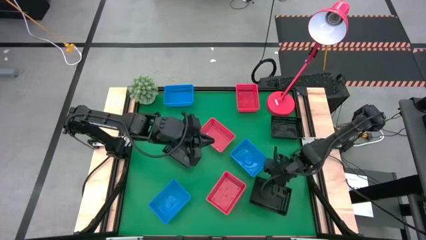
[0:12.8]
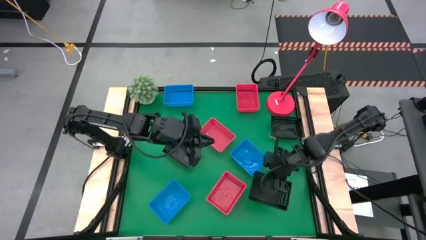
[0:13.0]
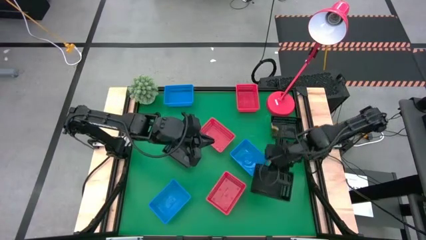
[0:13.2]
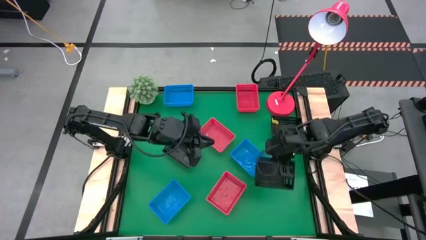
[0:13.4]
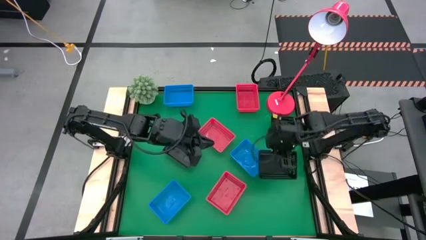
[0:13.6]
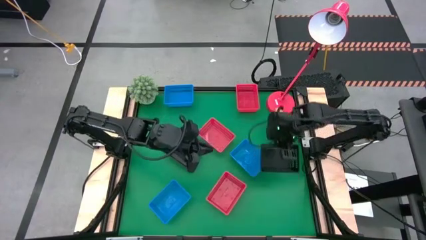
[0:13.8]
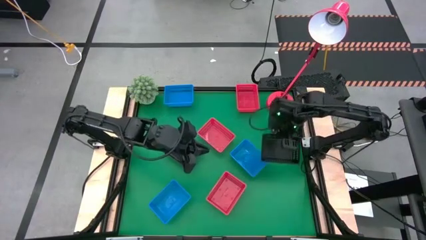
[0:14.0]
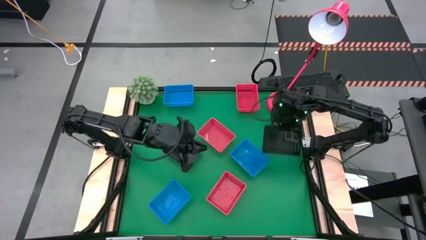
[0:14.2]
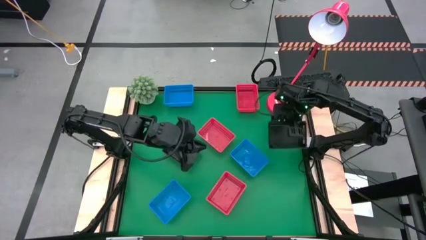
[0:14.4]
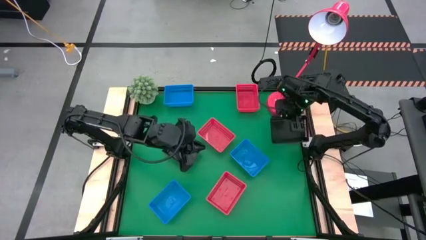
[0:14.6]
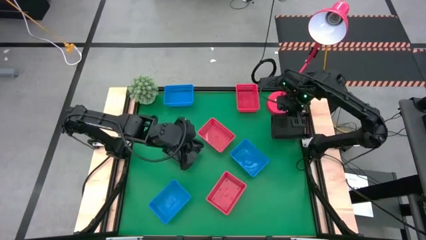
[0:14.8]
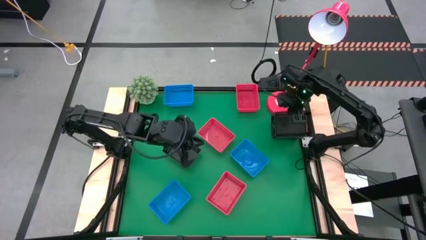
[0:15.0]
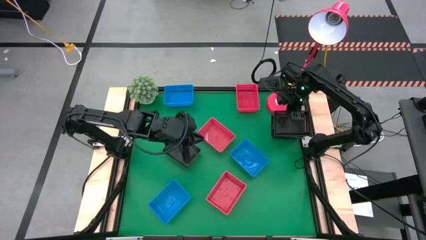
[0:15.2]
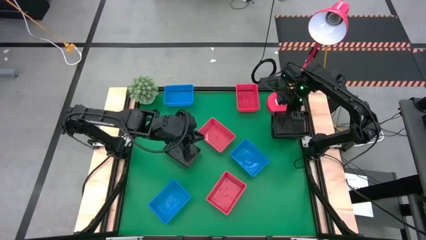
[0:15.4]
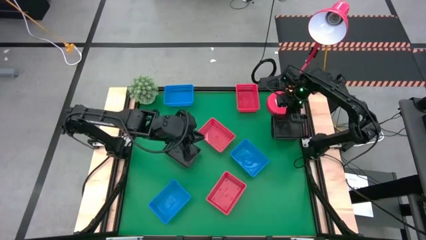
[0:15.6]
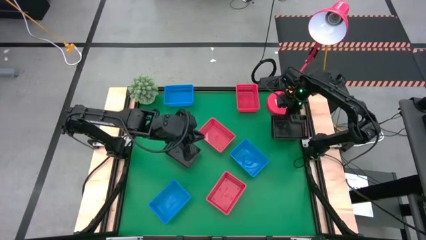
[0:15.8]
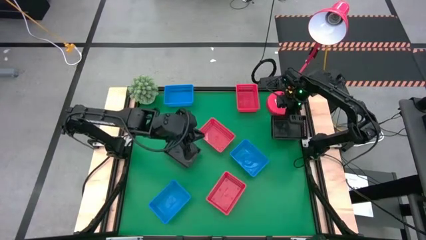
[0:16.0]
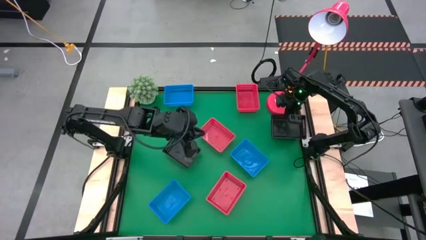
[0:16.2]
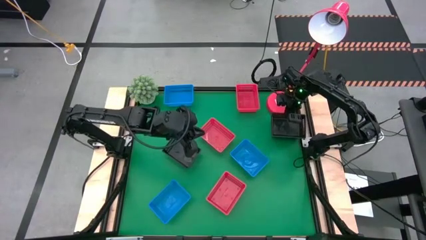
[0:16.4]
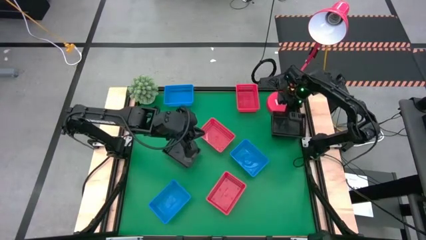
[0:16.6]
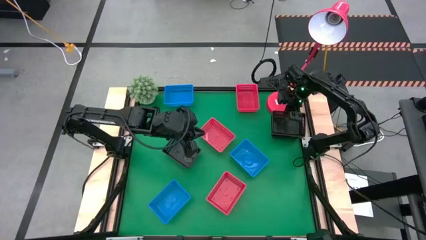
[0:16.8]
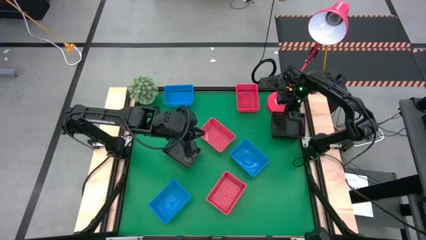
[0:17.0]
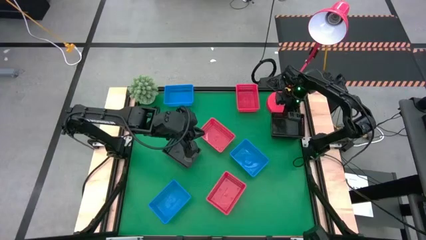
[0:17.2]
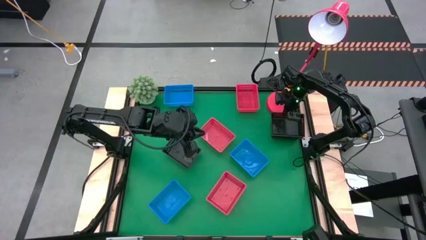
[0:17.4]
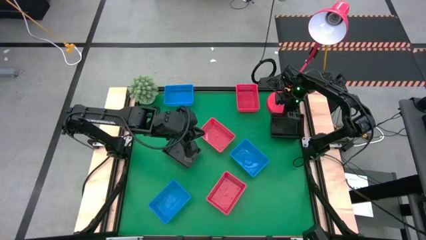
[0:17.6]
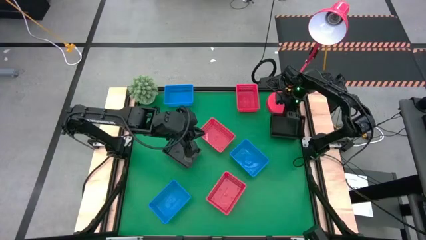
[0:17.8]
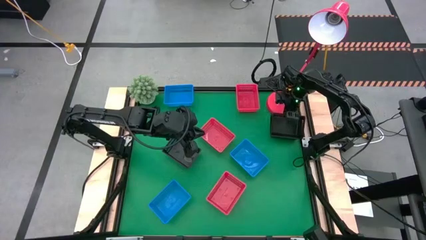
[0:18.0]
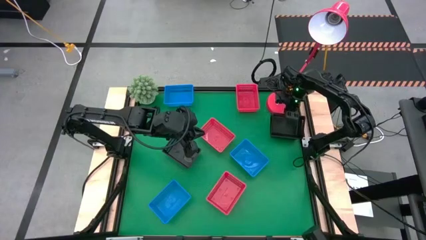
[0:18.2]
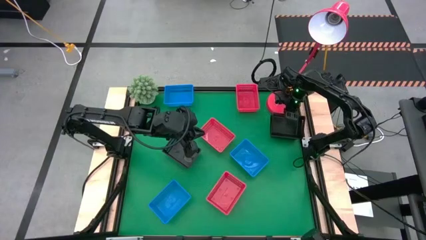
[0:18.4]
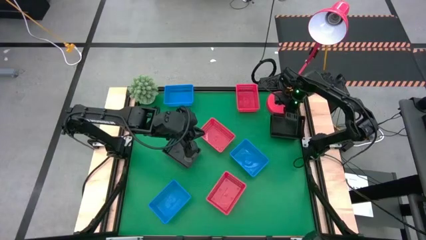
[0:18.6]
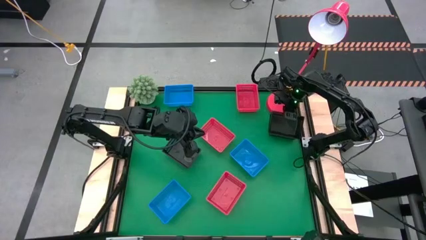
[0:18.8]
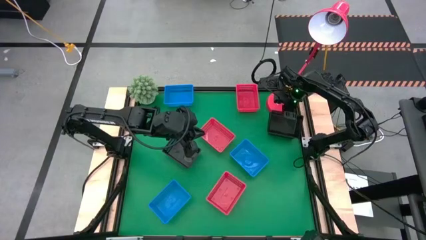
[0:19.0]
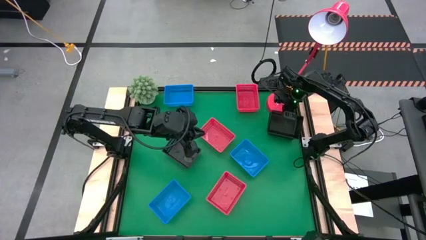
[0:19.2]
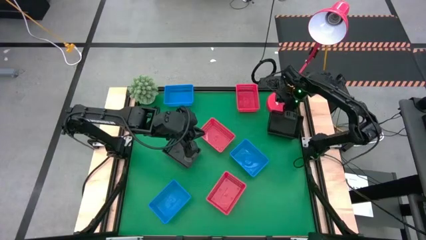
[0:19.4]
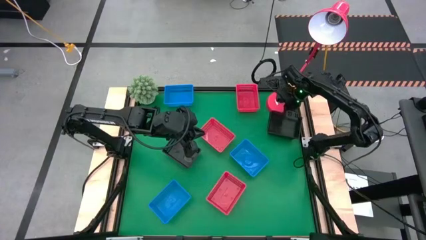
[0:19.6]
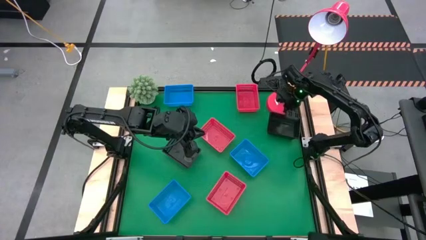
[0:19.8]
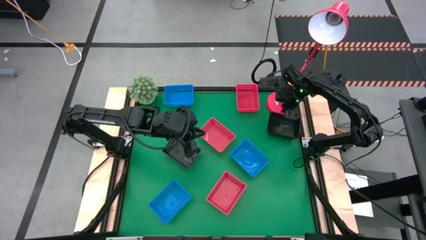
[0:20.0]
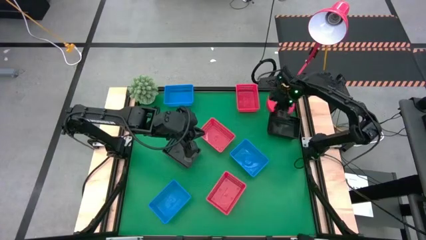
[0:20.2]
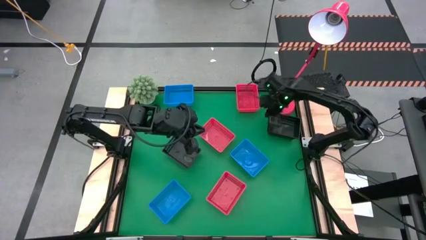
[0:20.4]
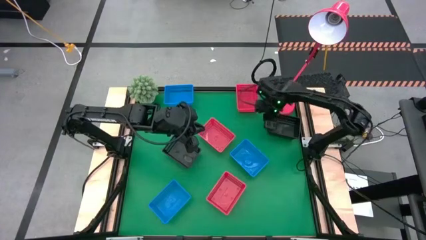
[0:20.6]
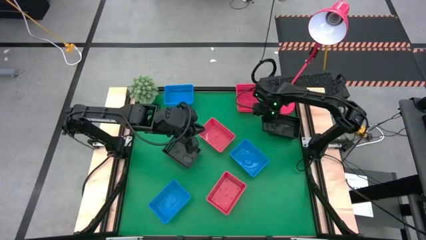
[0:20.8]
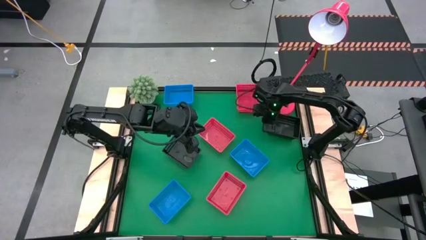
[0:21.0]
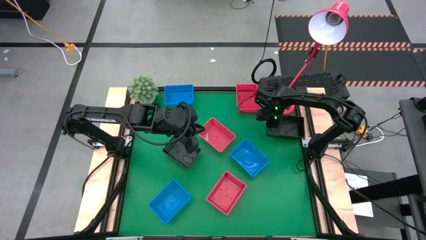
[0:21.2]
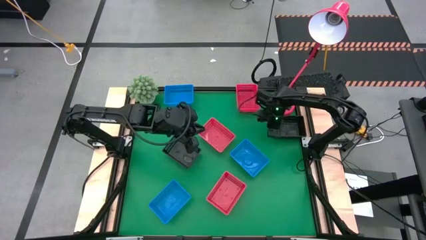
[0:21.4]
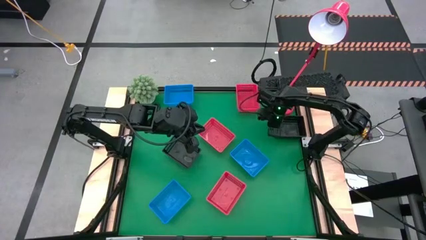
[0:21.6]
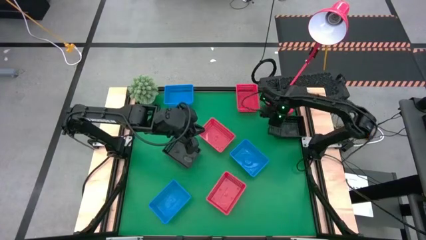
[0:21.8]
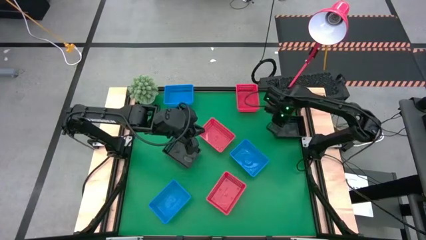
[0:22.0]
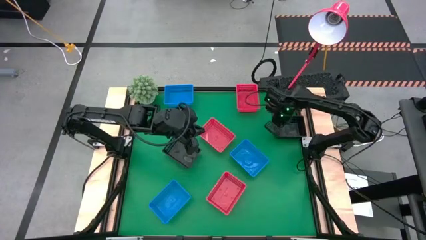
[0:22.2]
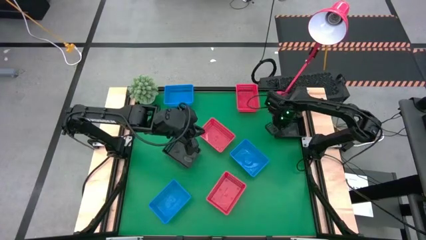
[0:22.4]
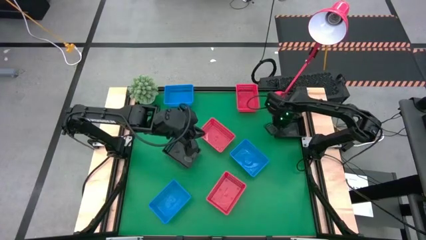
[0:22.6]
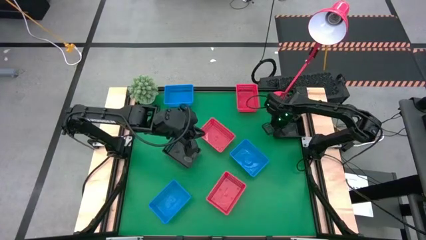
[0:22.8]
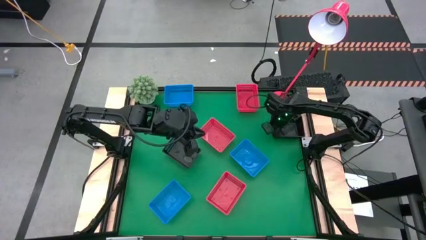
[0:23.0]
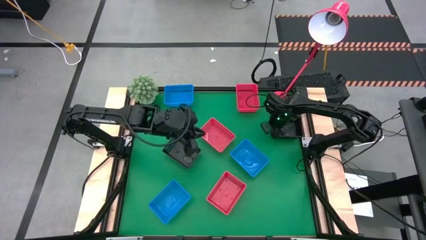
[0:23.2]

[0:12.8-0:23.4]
Stack the bottom black bin on top of the right black bin
